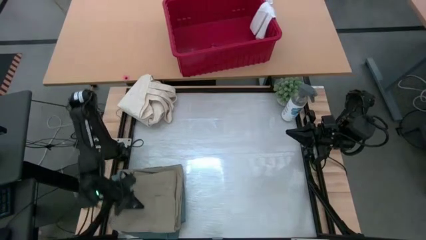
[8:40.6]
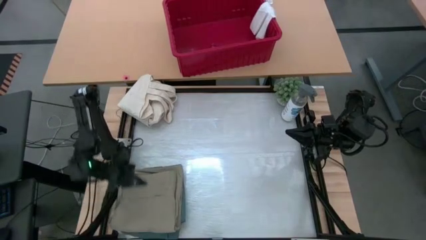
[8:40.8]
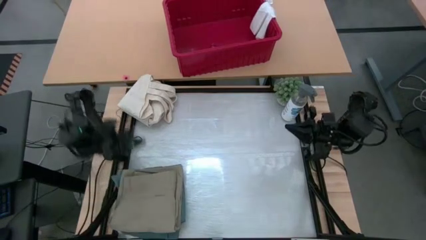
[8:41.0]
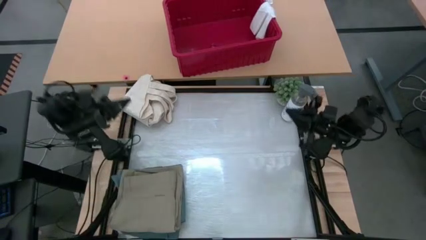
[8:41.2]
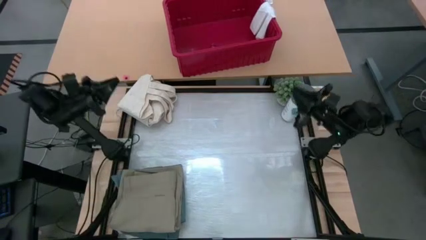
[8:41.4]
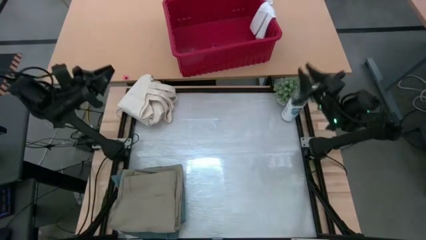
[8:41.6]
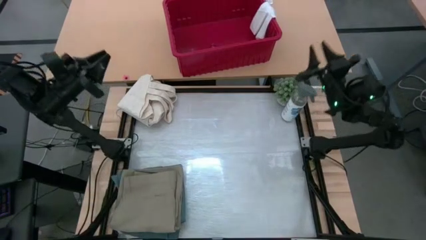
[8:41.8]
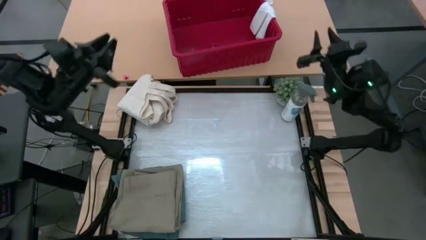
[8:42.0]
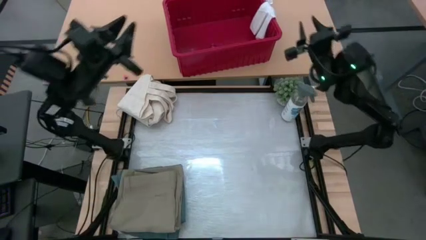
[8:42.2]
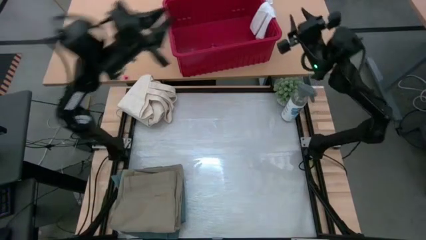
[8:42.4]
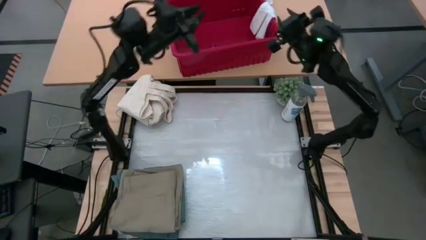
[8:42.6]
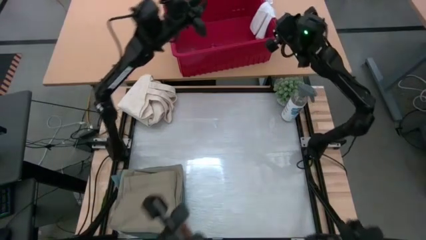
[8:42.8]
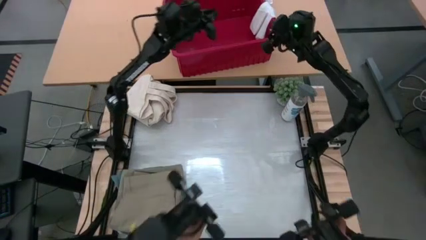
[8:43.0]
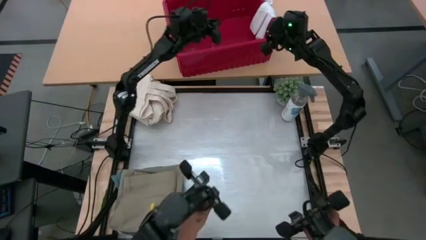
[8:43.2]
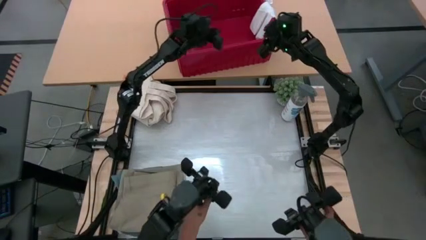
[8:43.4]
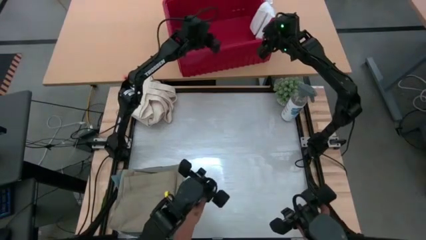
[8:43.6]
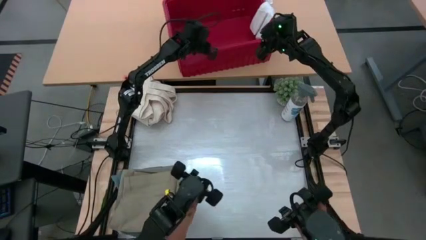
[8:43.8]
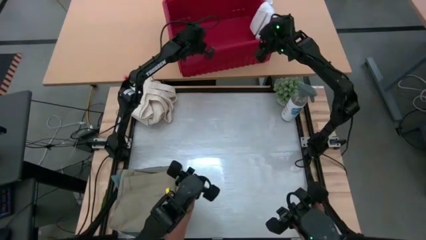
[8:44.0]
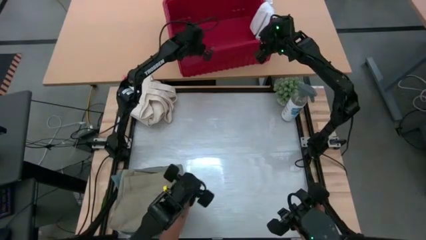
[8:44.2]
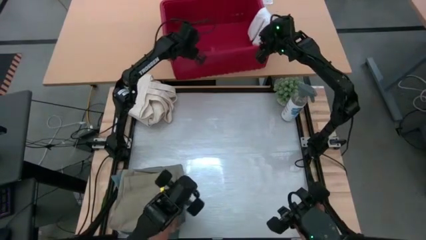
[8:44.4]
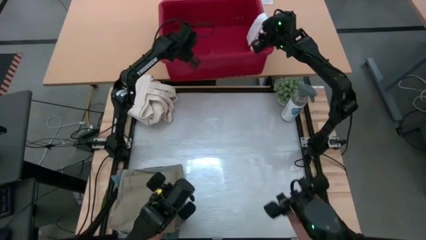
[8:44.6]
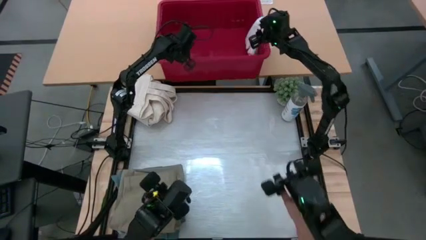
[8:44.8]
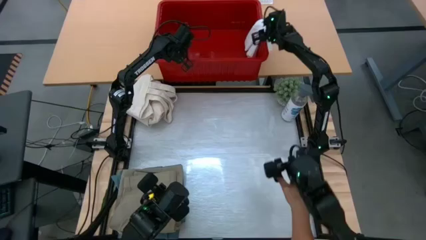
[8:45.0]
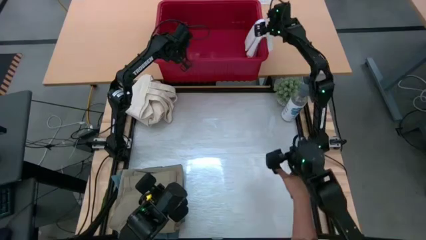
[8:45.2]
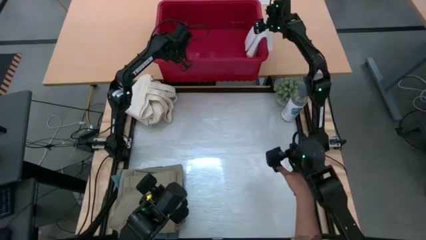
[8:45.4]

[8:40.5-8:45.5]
Task: Fold Laundry from Bin
Move the red organizer bin to the bottom edge of the other table

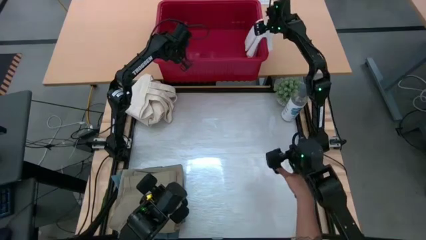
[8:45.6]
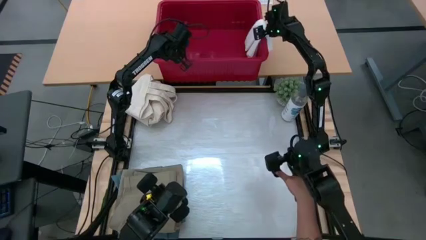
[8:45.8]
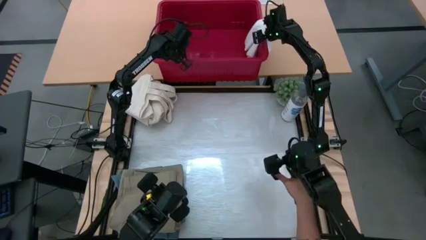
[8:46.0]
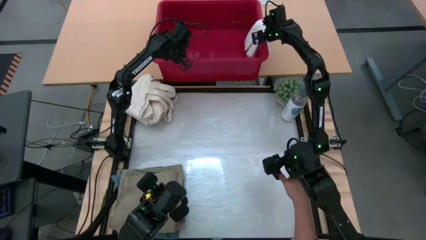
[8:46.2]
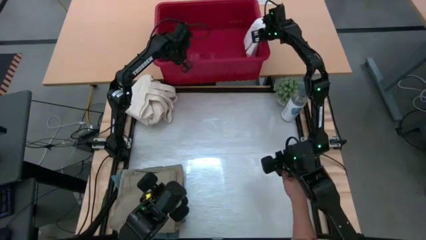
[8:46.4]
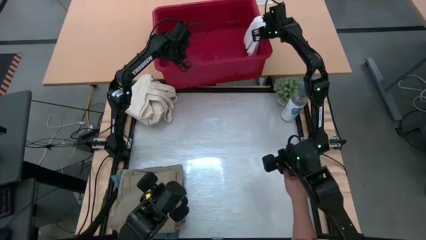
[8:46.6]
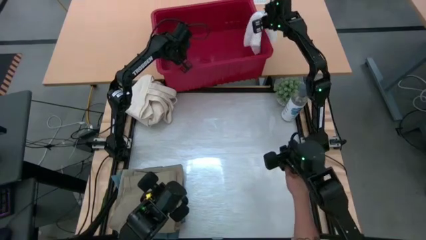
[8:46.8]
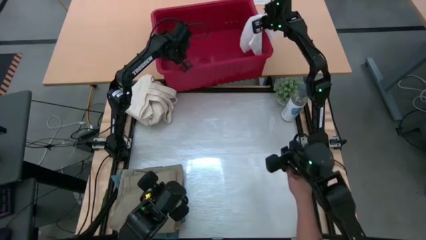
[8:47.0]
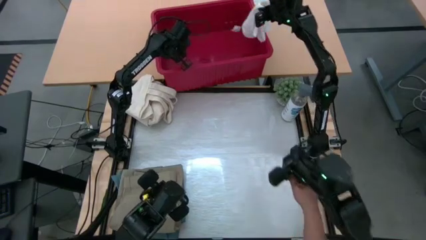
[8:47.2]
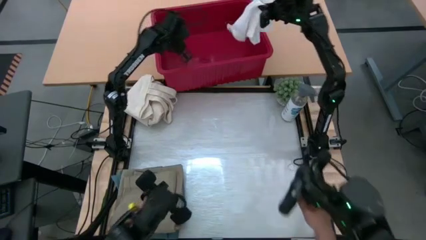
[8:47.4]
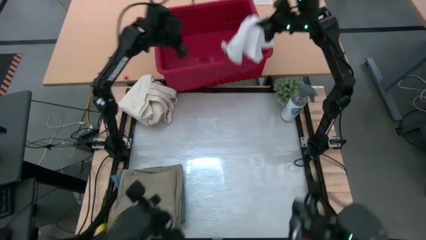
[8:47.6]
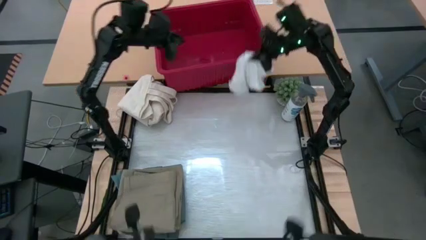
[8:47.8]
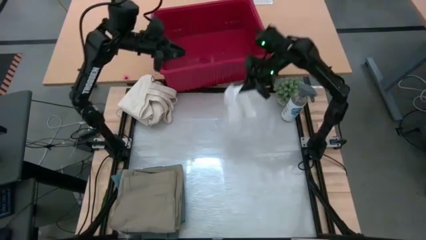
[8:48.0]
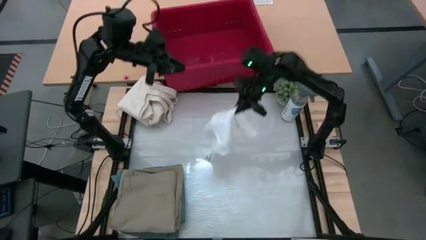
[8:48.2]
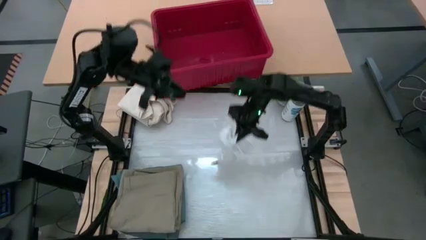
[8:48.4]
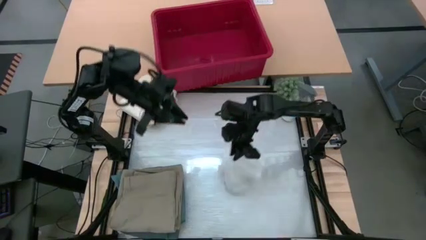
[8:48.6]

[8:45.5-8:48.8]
Put the white underwear in the center of the table

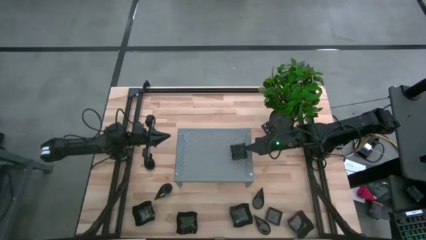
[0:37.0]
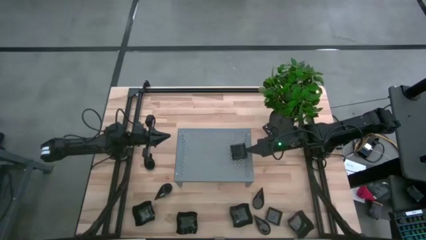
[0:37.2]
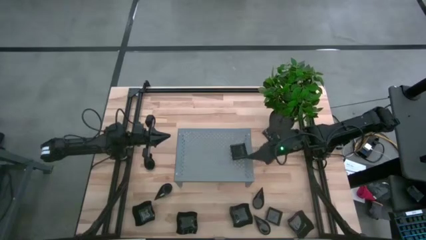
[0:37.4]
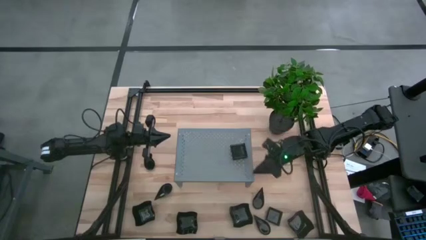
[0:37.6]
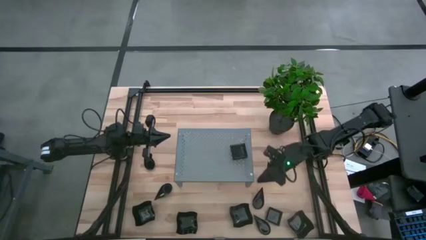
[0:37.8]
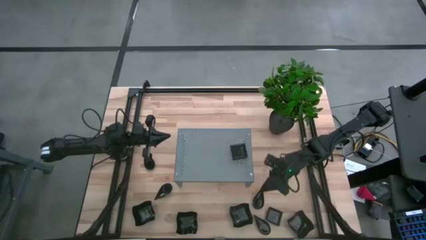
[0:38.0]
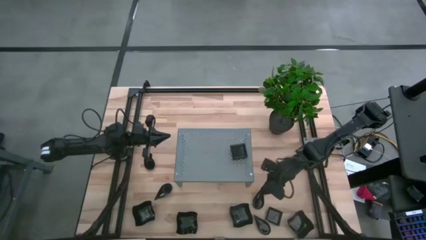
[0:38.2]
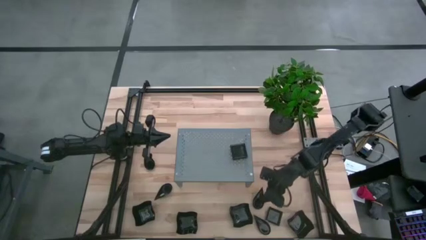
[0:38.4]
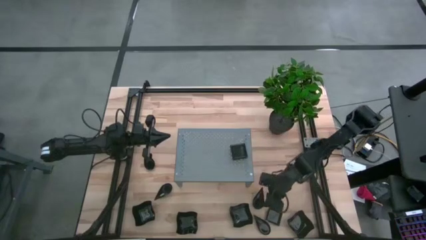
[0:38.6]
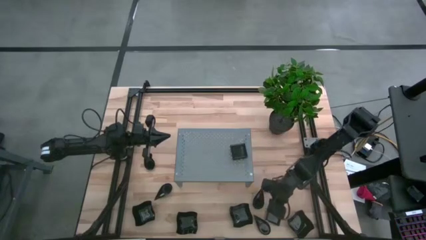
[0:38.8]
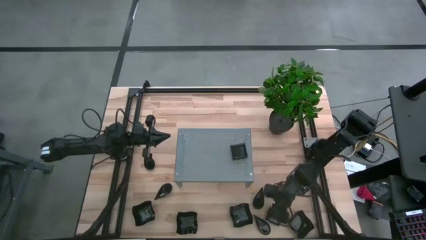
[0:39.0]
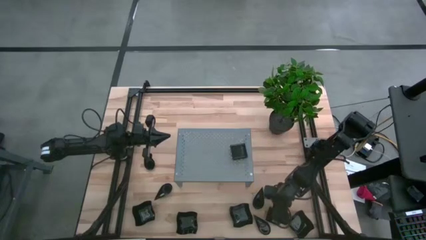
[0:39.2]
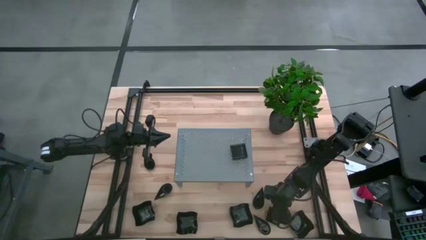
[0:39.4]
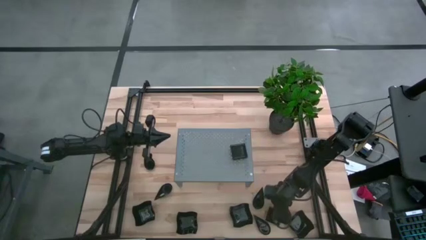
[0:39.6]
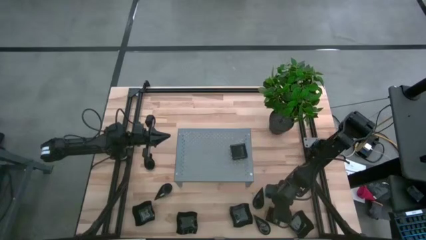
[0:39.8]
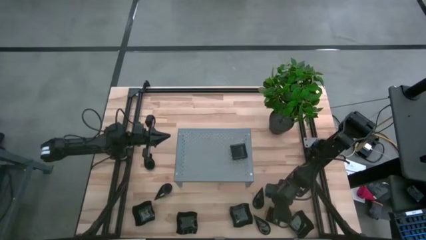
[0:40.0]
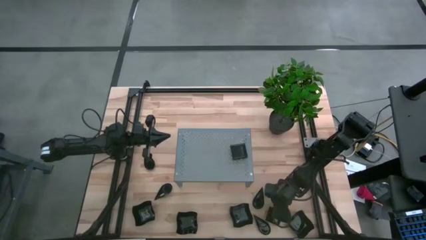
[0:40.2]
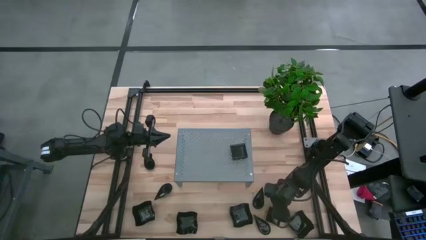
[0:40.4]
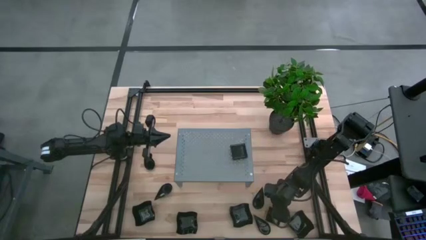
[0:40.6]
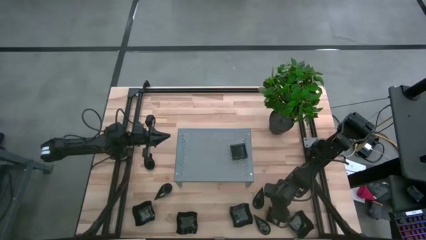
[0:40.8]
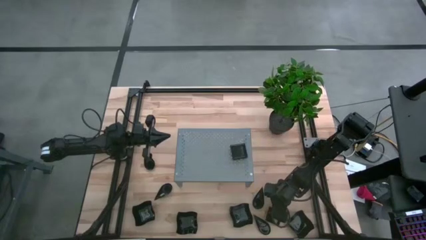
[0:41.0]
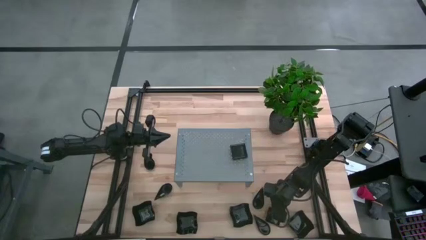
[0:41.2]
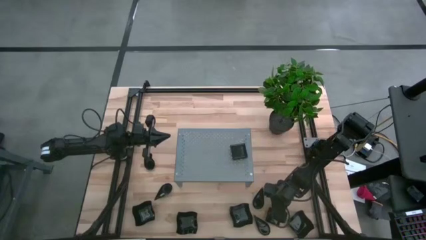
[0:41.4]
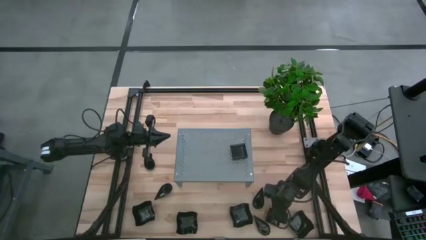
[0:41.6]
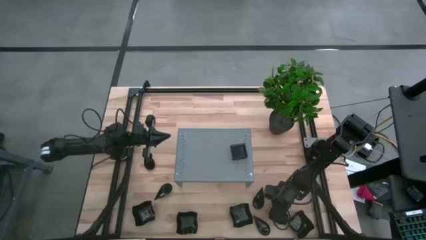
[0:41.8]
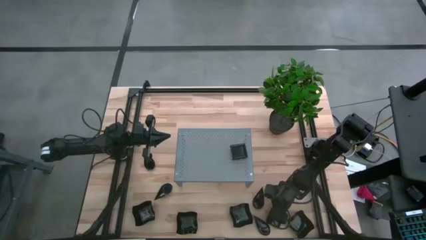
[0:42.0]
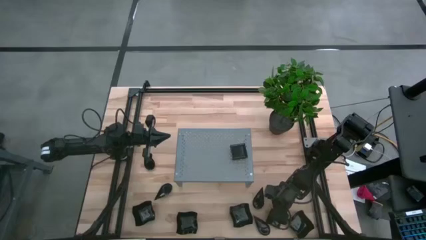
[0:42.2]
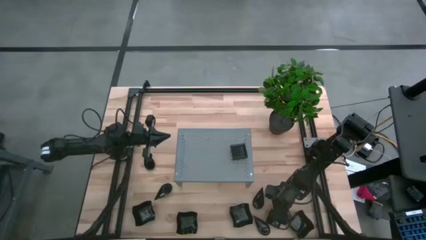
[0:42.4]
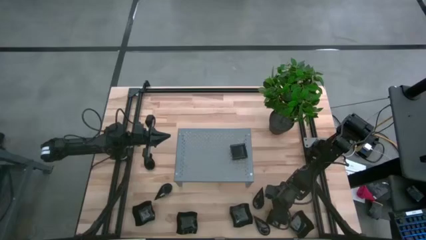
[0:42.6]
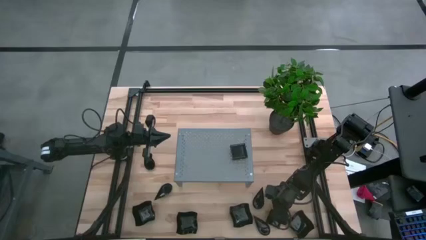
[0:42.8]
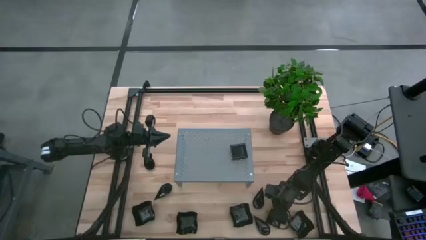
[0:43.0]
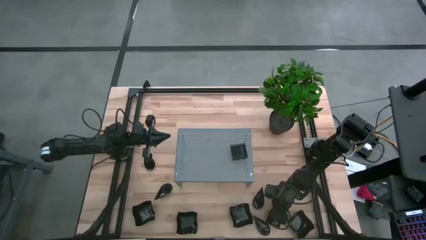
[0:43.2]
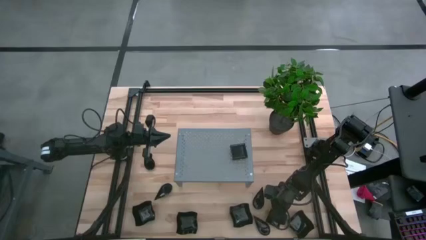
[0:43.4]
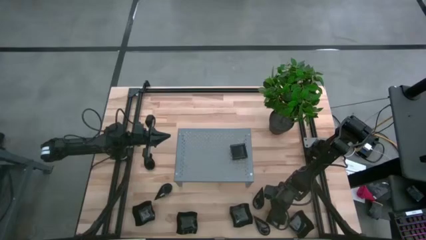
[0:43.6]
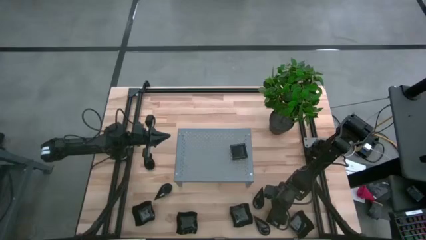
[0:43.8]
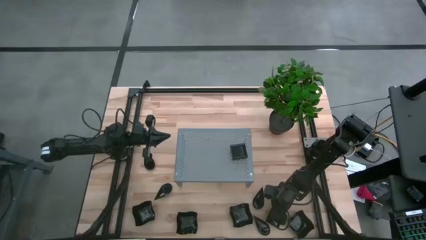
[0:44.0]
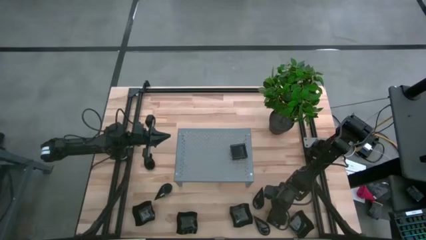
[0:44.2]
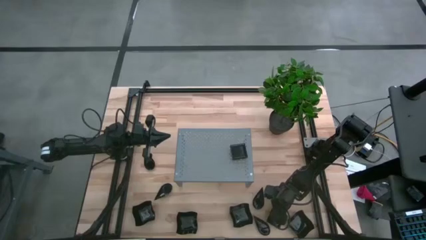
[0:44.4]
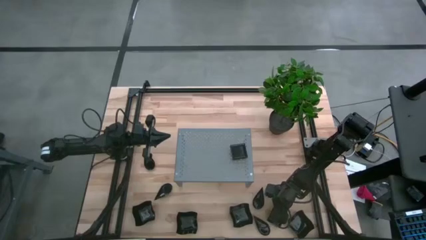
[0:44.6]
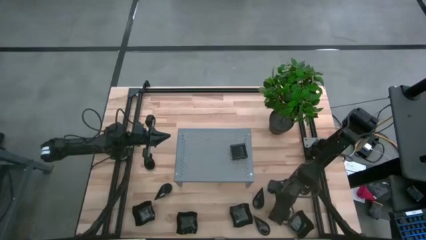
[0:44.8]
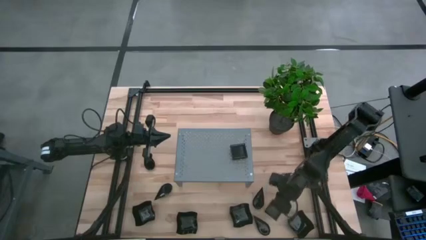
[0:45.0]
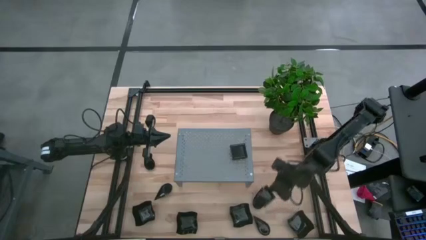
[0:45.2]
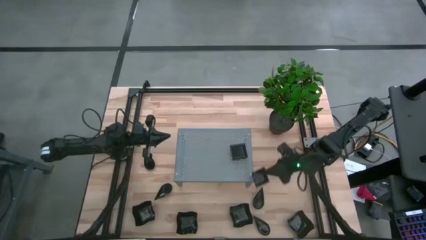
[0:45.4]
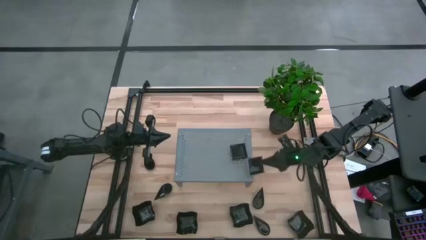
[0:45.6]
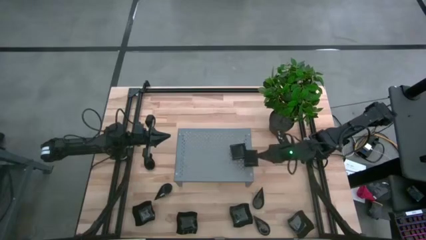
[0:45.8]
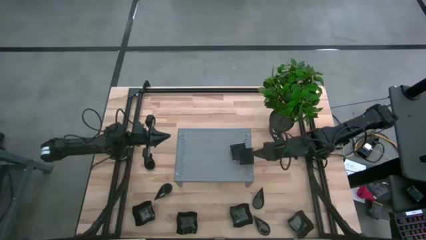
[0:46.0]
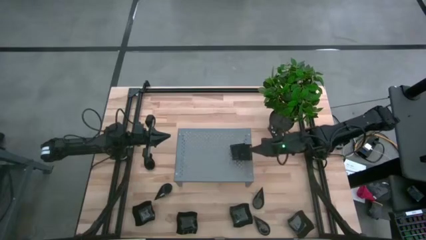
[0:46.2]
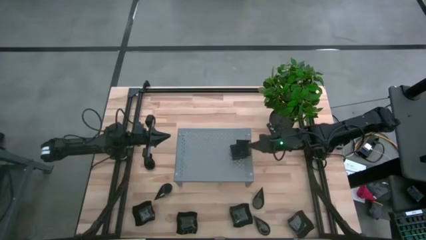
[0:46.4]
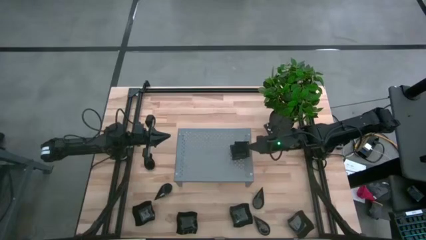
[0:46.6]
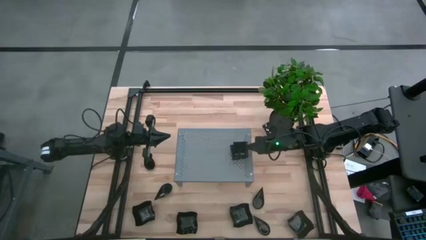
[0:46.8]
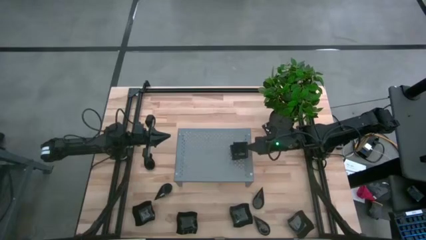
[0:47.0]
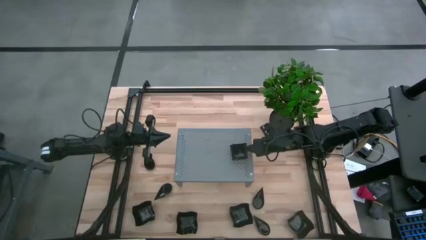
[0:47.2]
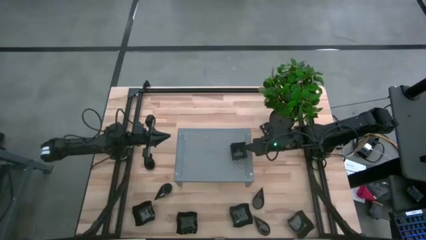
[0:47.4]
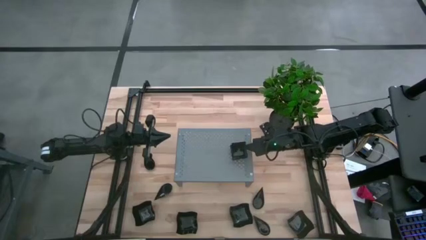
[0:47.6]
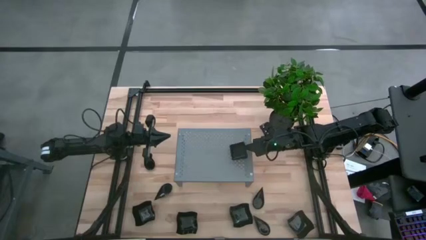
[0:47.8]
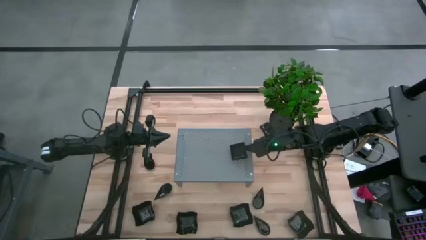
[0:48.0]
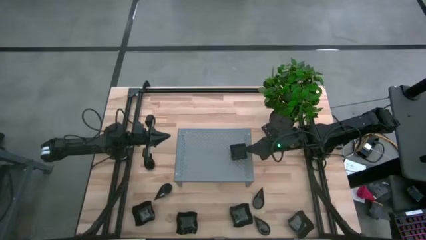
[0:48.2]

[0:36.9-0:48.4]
Task: Pick & Place Mini shaped plates
Stack the black square plate on the black square plates on the shelf
